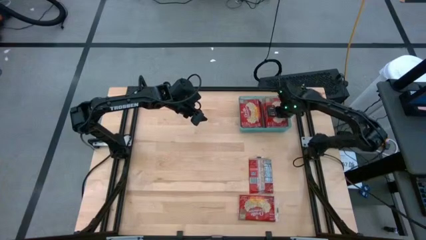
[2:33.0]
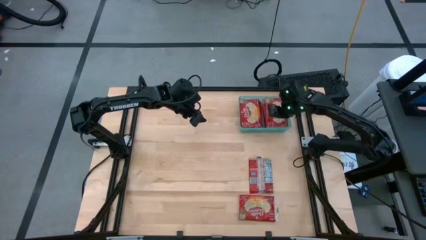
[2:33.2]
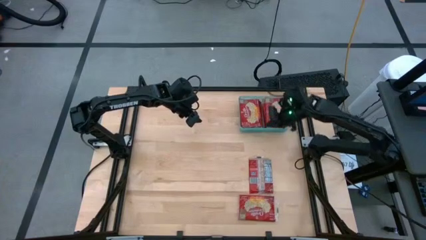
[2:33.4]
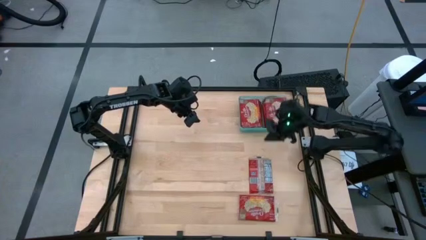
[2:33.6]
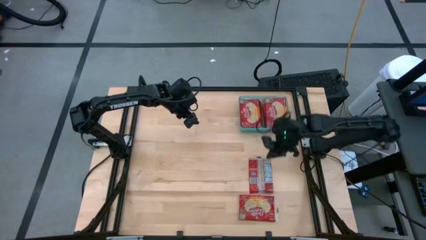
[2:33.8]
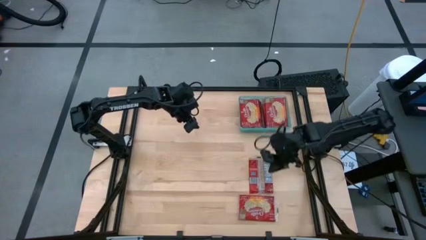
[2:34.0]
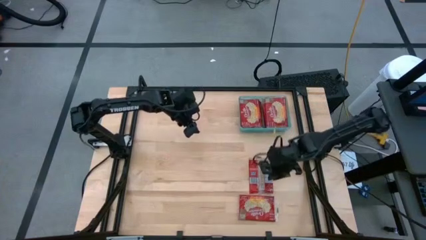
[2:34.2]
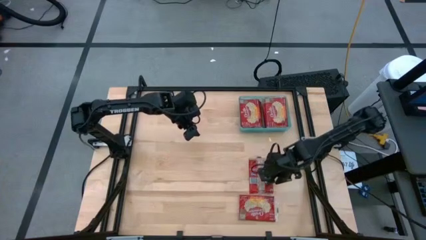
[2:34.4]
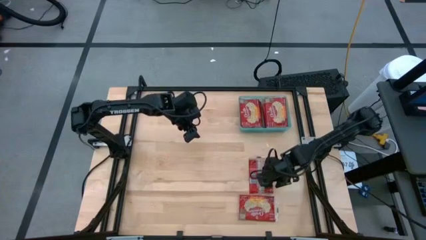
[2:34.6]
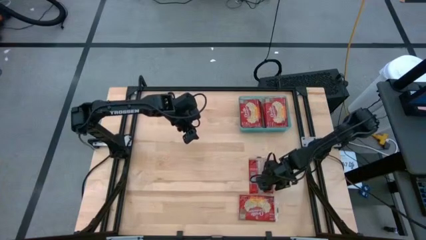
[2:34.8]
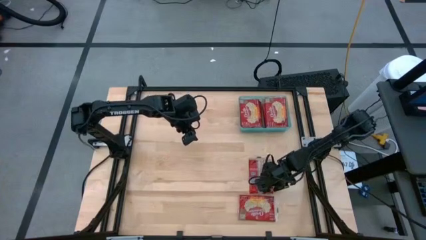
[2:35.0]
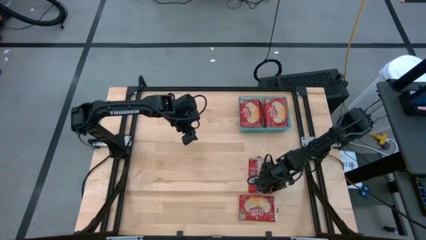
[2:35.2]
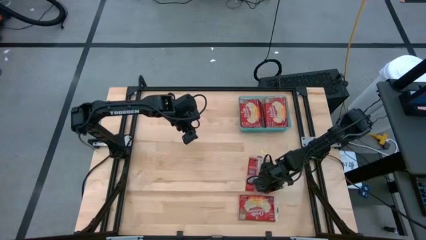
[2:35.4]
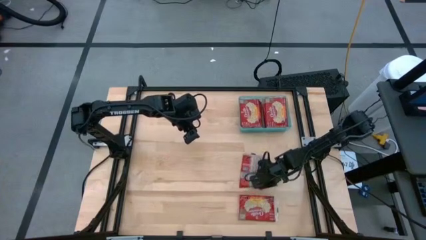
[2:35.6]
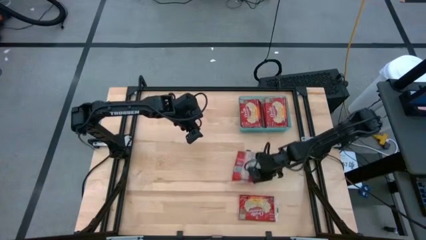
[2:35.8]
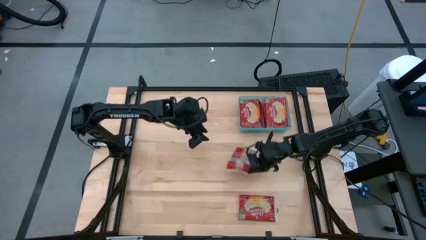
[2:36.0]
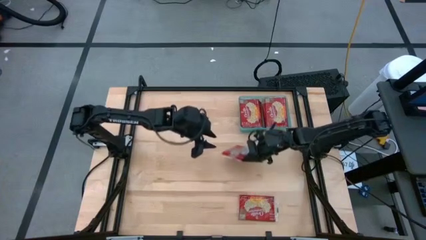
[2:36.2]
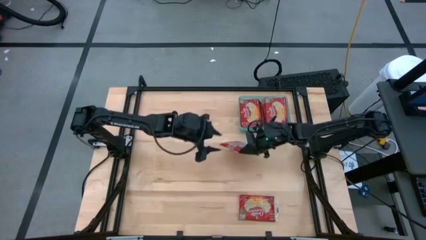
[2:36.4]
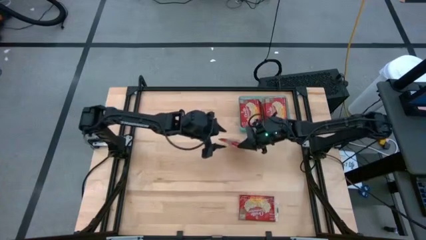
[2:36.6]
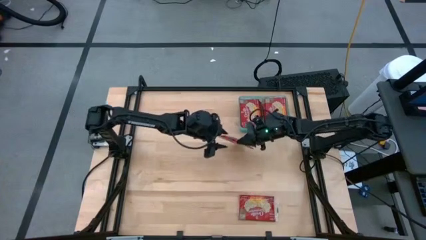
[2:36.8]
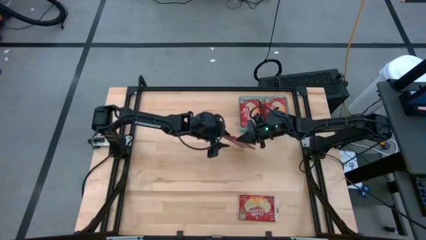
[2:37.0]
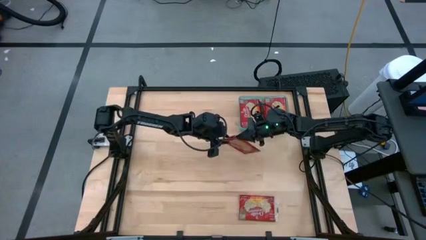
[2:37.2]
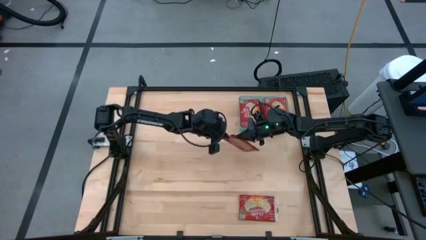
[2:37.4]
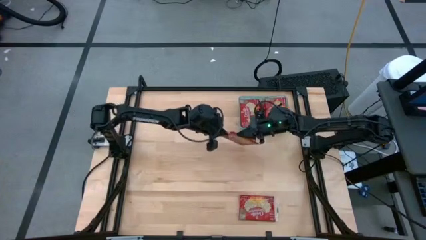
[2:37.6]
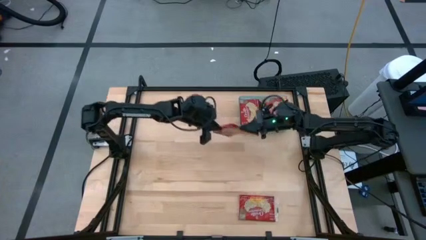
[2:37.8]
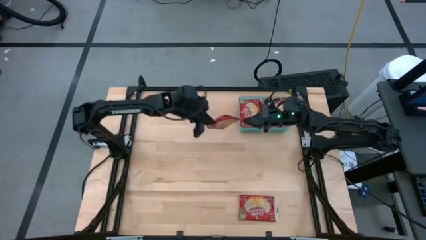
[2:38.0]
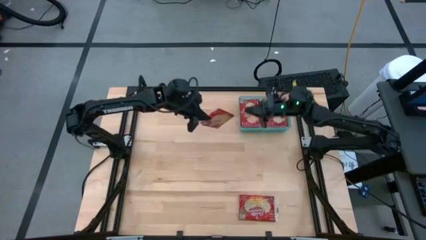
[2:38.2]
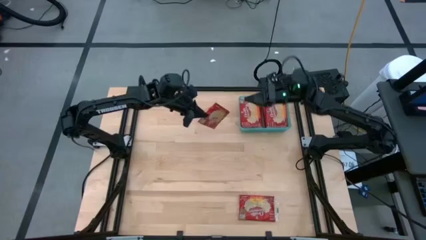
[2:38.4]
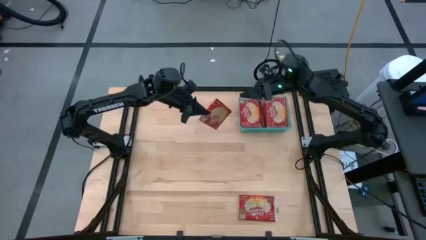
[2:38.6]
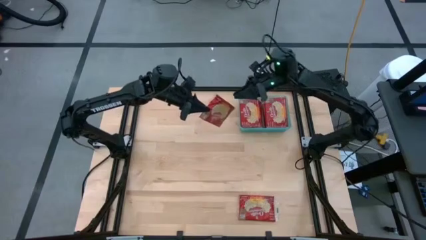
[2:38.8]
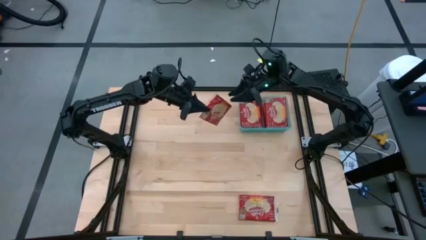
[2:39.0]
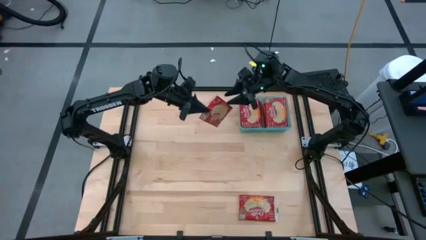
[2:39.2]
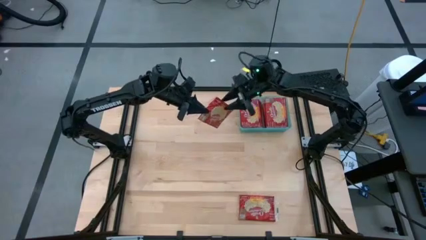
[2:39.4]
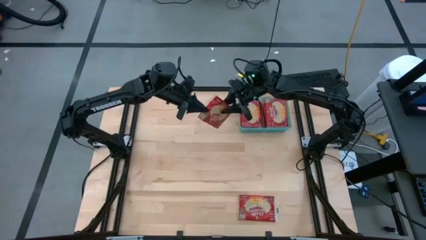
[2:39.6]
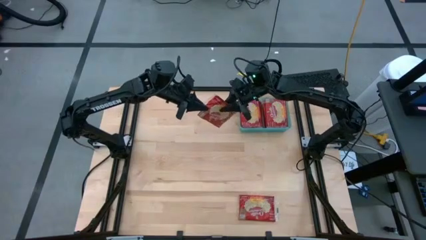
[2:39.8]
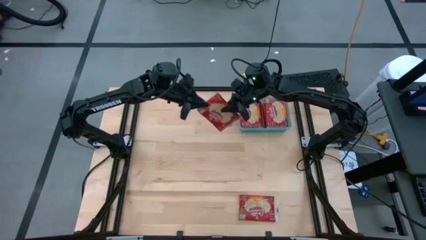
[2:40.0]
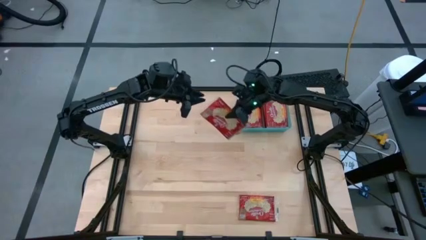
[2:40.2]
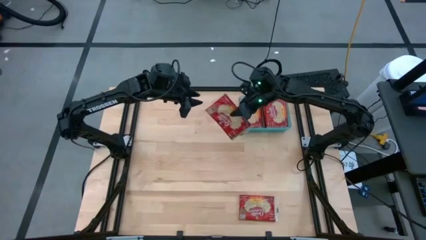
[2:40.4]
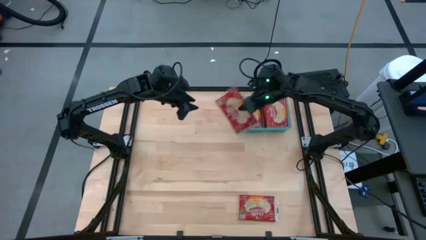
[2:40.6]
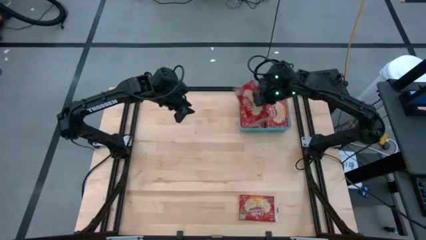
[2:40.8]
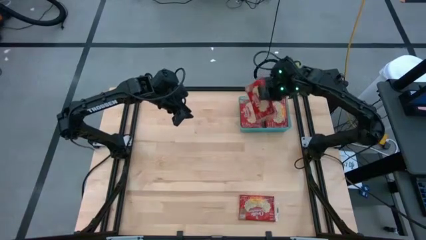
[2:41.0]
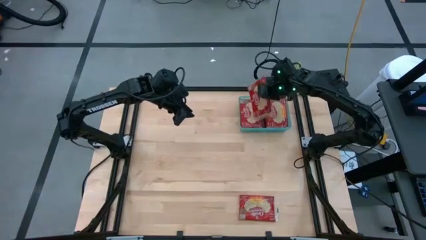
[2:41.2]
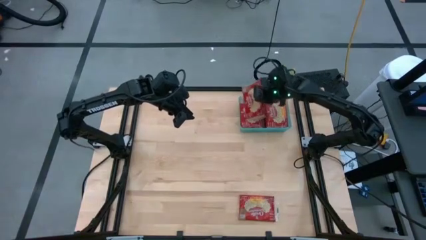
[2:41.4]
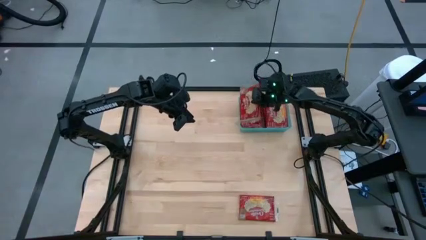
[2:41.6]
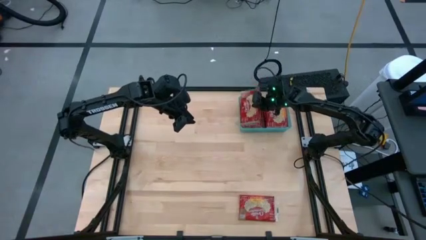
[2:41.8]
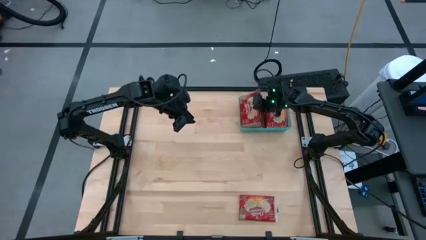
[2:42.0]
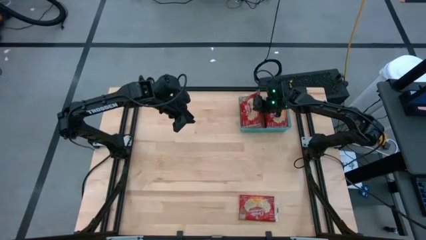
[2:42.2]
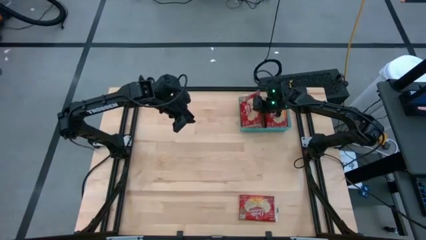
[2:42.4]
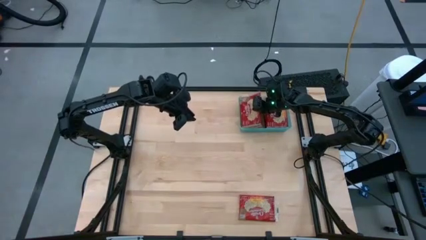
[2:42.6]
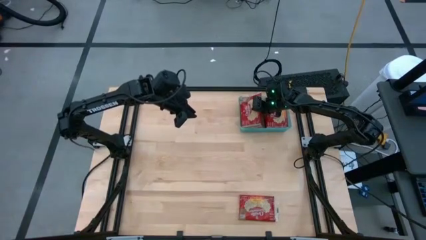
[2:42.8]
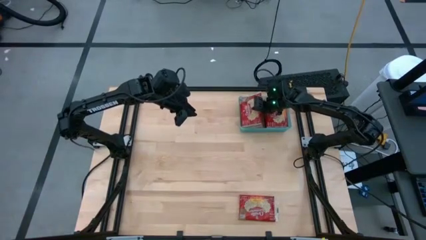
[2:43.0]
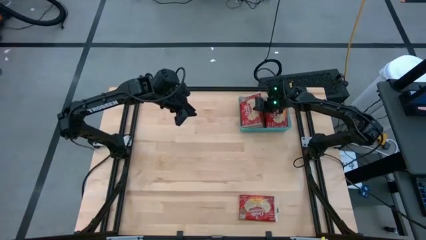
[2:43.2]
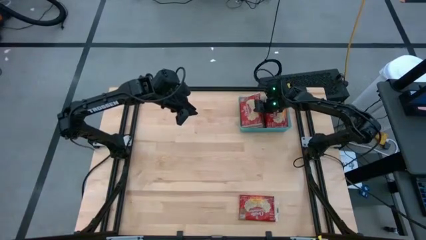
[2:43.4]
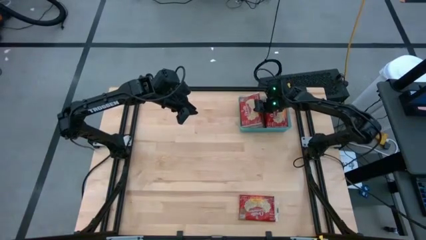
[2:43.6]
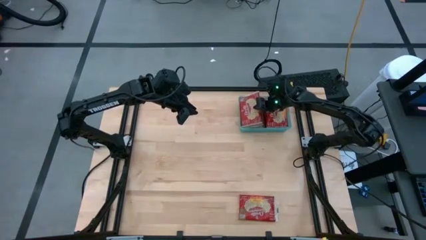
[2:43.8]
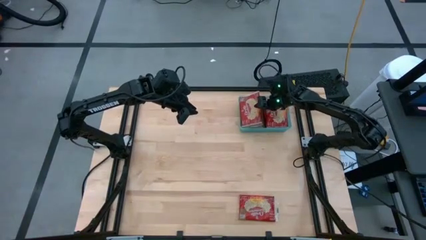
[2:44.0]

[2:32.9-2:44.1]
Task: Sort popcorn bags into baskets
Put the red popcorn bag into the light blue bin

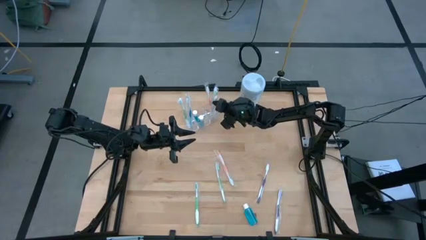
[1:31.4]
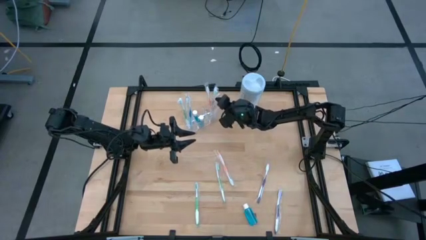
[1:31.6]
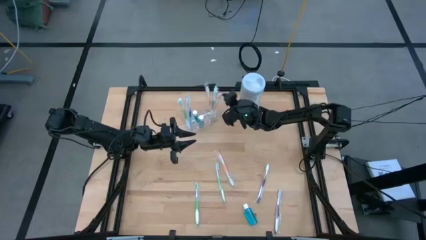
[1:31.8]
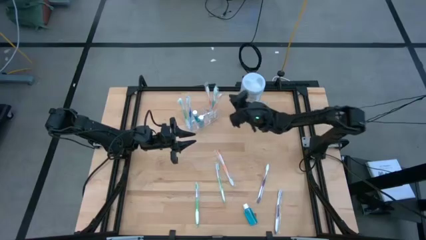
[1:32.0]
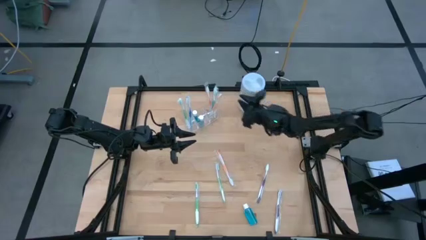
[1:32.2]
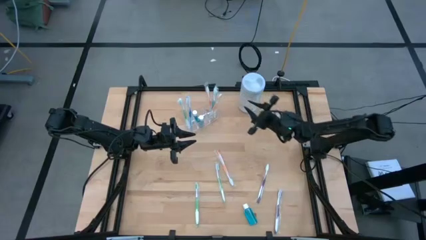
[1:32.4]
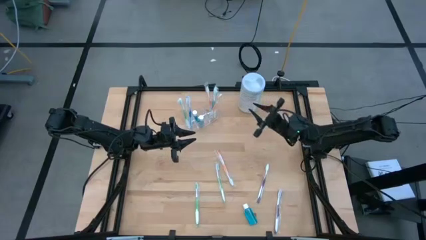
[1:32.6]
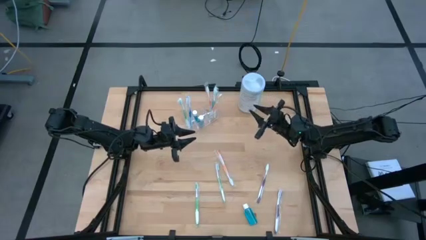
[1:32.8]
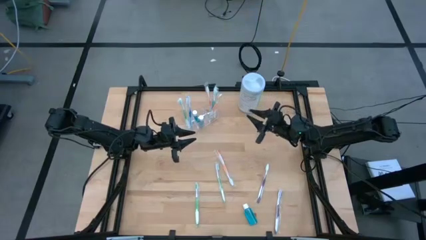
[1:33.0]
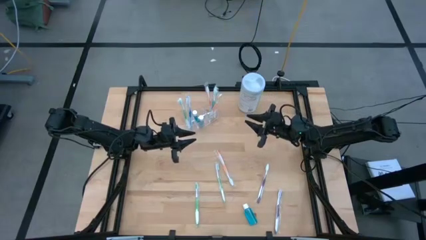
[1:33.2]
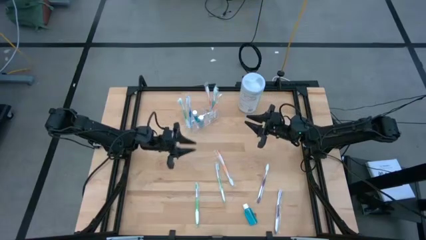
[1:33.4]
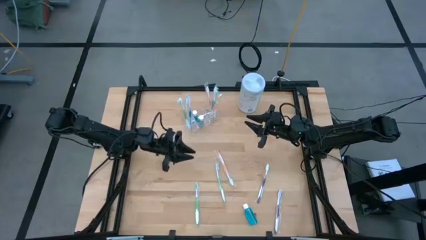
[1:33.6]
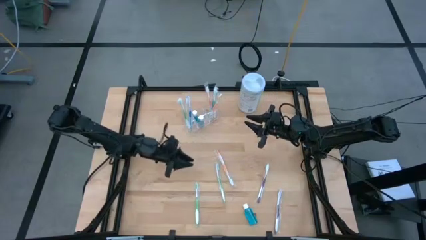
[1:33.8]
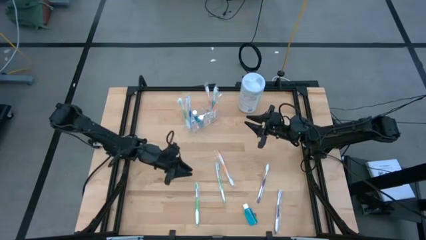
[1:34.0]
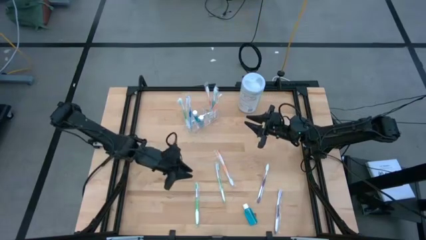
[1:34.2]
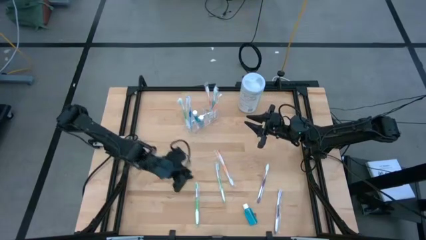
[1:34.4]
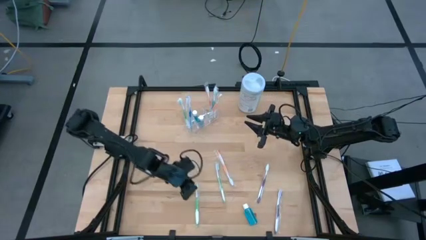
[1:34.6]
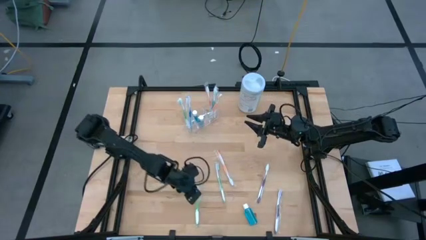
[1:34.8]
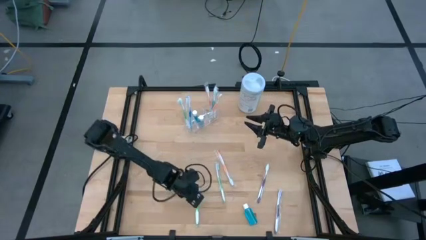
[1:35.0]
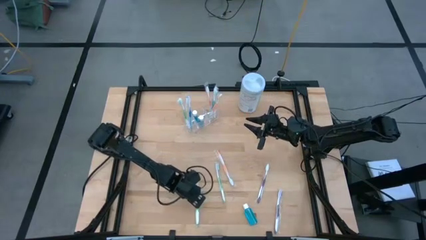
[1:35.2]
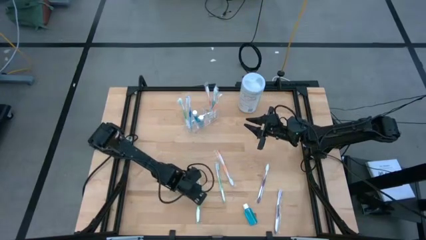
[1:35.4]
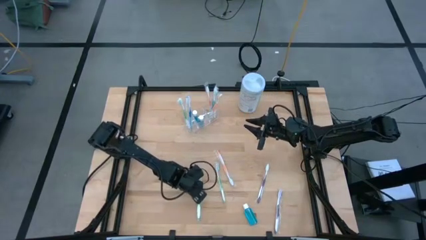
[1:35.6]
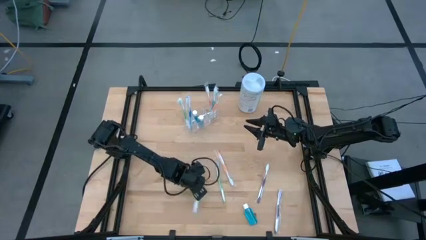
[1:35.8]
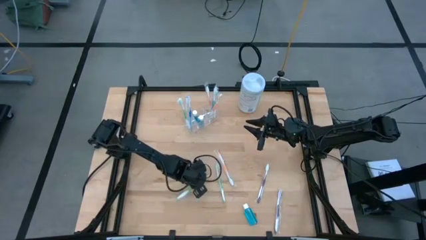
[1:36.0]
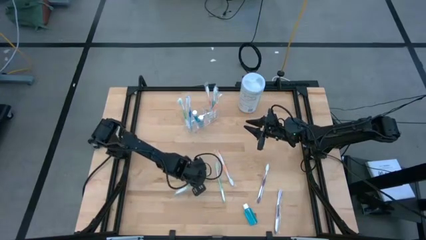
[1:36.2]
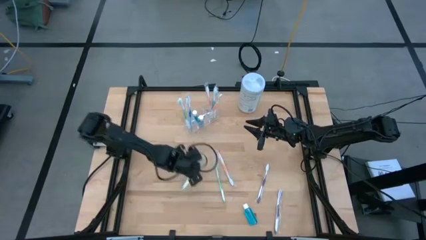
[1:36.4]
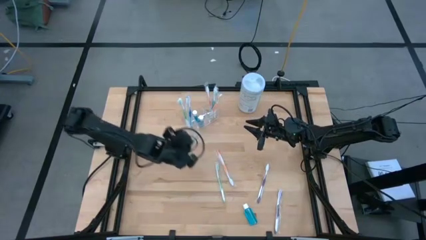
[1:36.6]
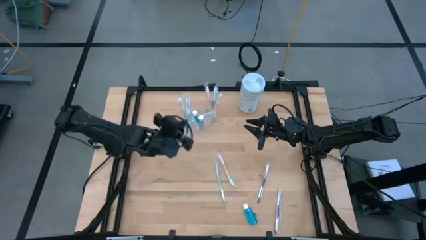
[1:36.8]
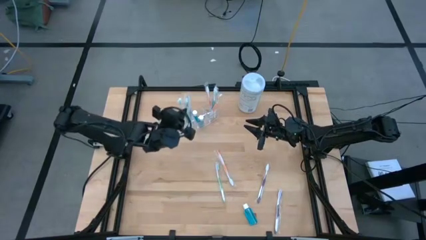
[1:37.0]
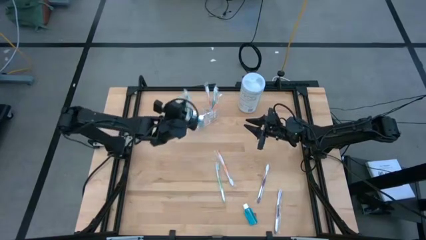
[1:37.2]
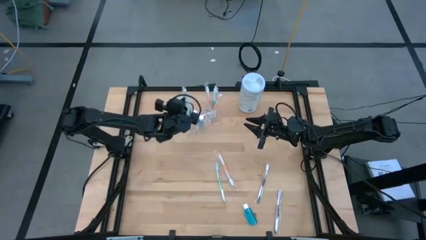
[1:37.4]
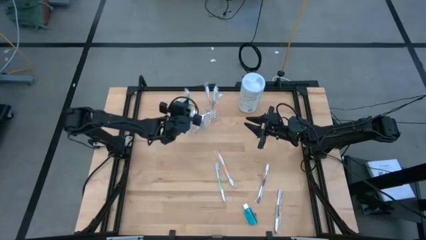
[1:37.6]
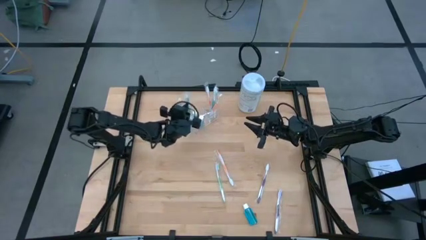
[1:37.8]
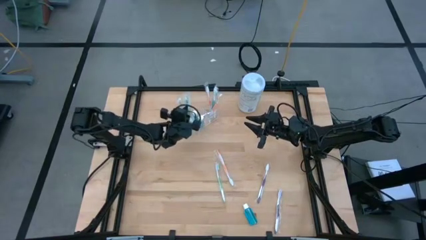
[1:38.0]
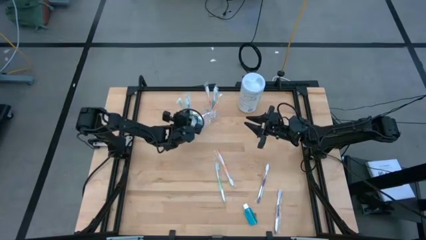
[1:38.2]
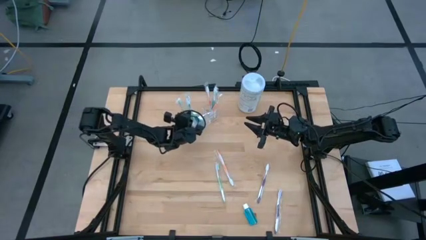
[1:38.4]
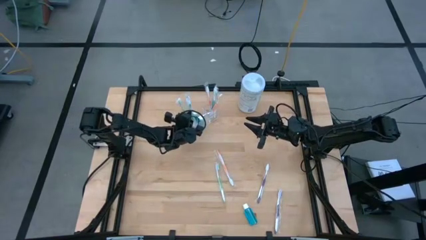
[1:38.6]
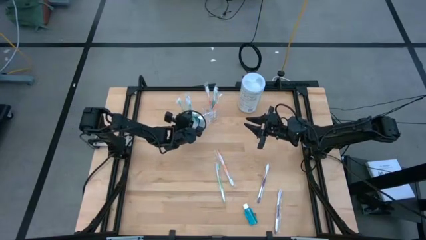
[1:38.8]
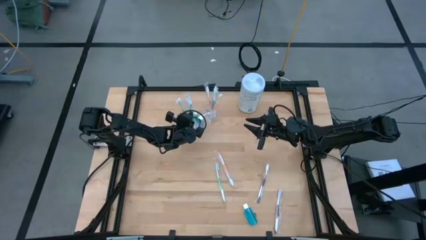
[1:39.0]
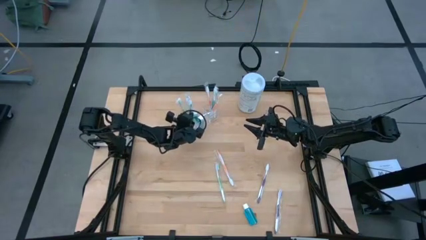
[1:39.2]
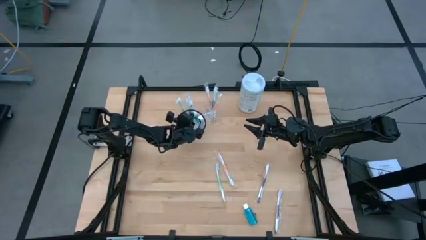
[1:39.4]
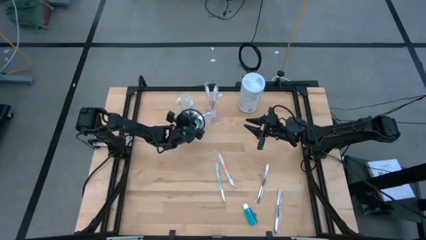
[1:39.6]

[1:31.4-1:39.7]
Task: Pick & Place toothbrushing station
Put the green toothbrush into the transparent organizer
